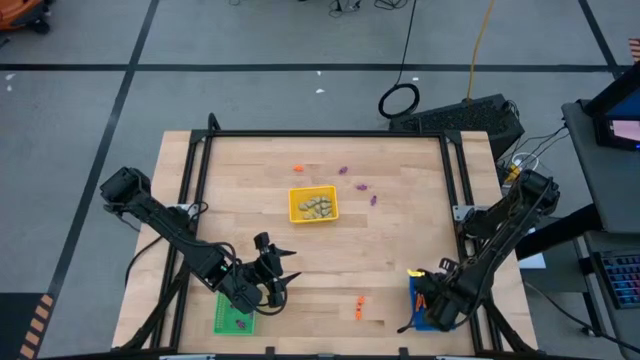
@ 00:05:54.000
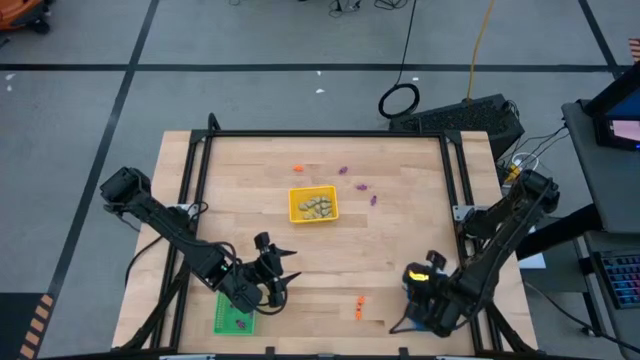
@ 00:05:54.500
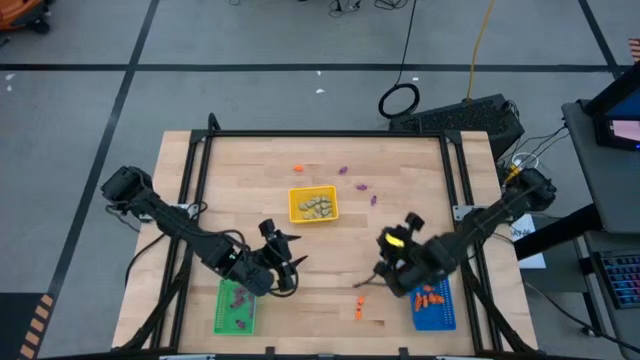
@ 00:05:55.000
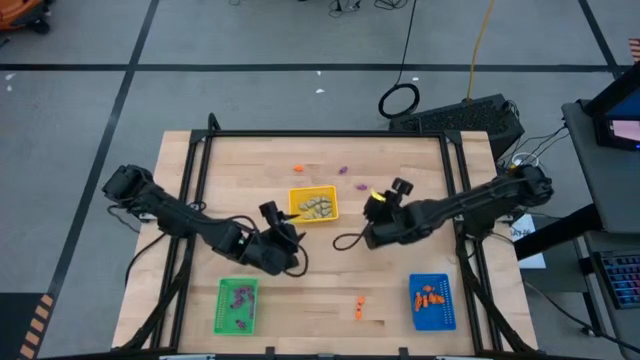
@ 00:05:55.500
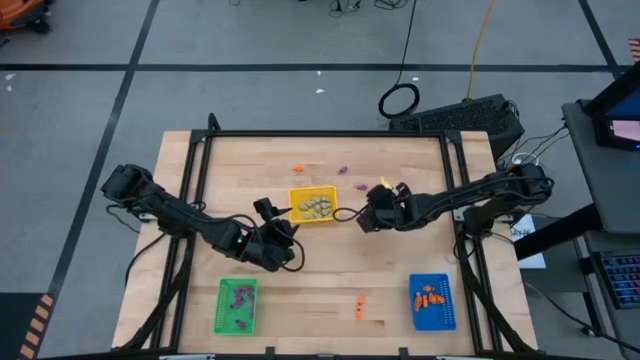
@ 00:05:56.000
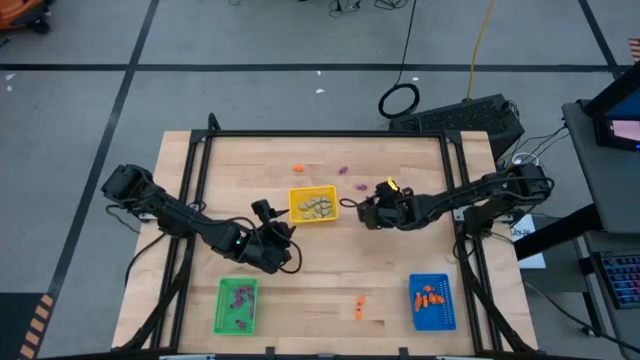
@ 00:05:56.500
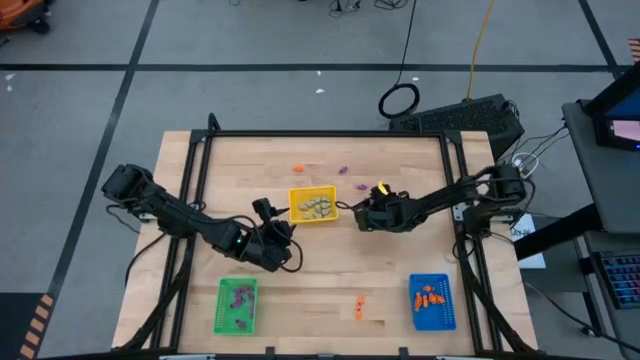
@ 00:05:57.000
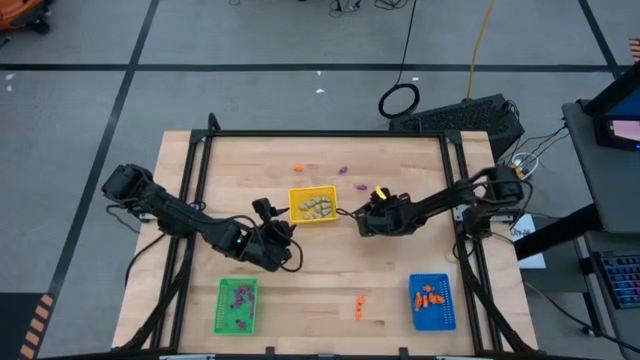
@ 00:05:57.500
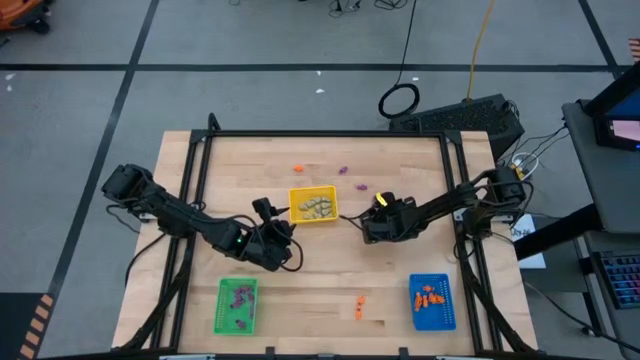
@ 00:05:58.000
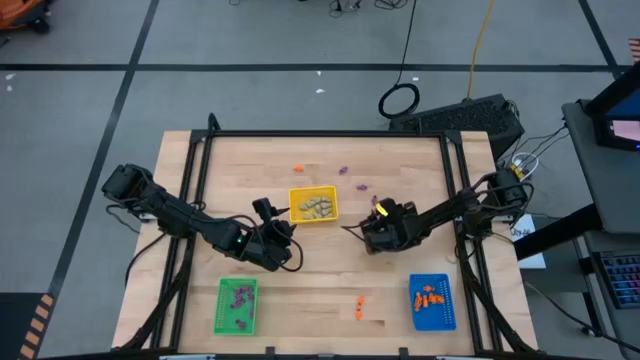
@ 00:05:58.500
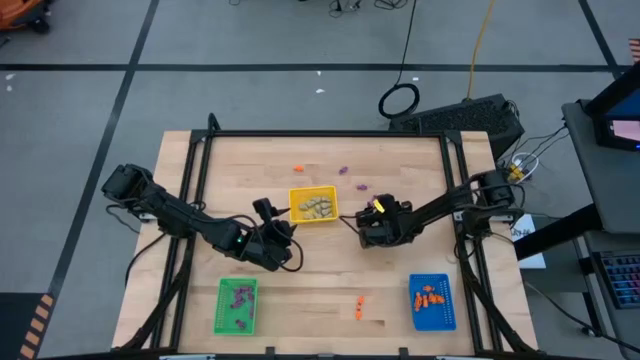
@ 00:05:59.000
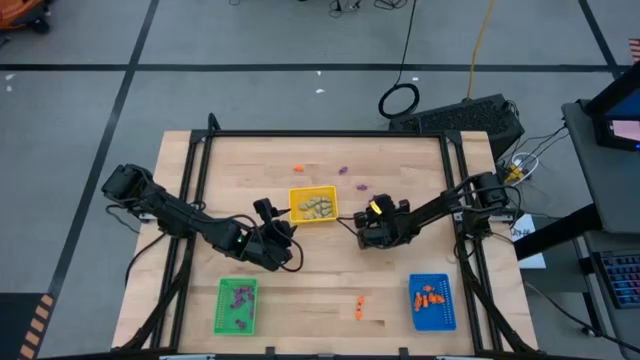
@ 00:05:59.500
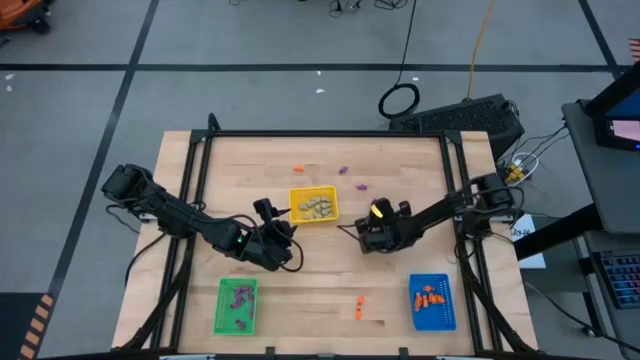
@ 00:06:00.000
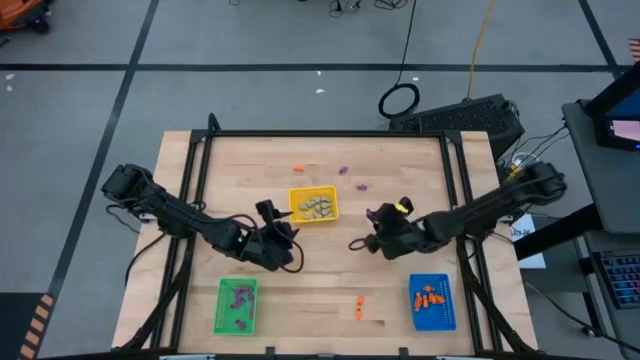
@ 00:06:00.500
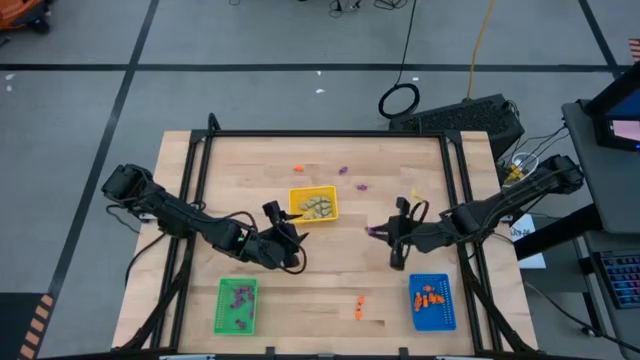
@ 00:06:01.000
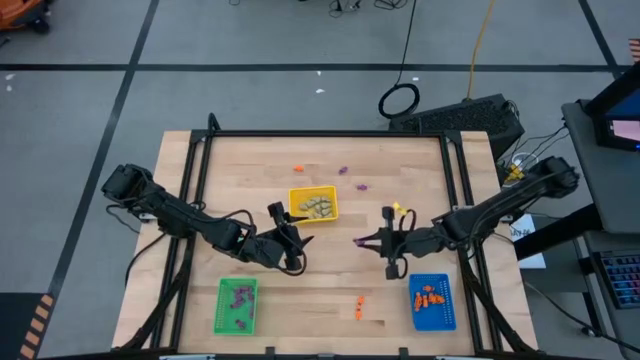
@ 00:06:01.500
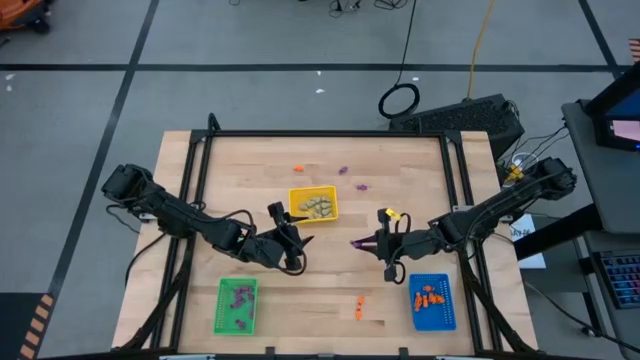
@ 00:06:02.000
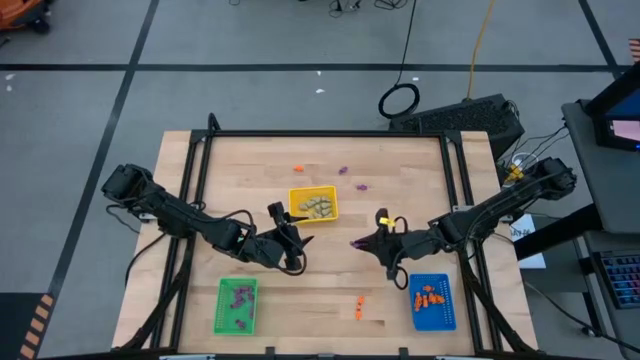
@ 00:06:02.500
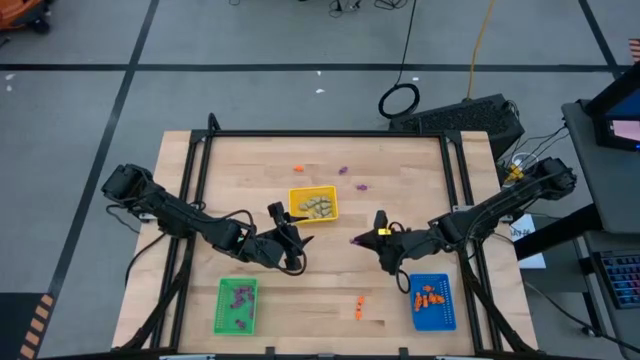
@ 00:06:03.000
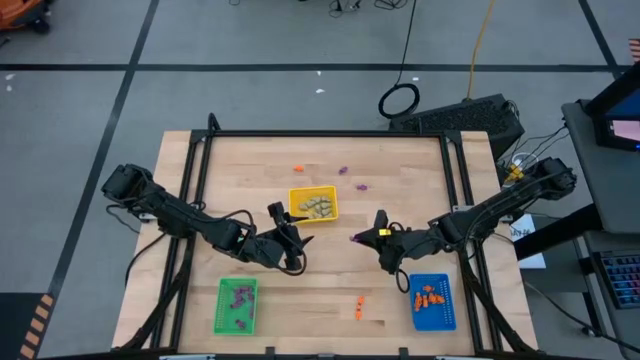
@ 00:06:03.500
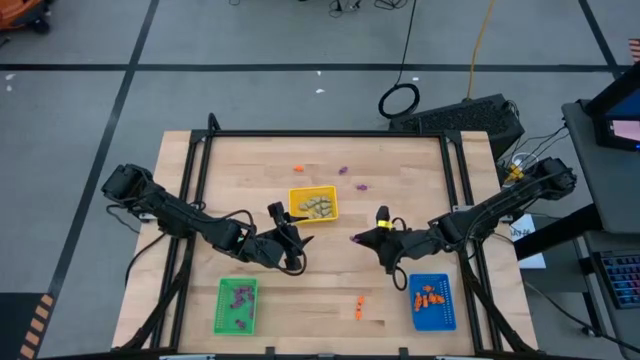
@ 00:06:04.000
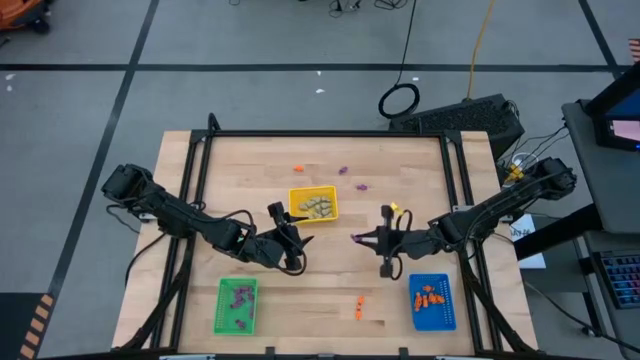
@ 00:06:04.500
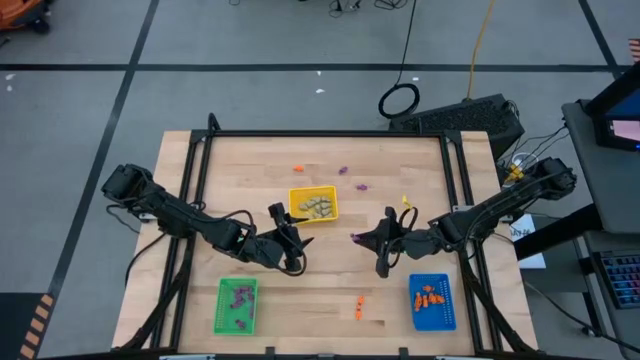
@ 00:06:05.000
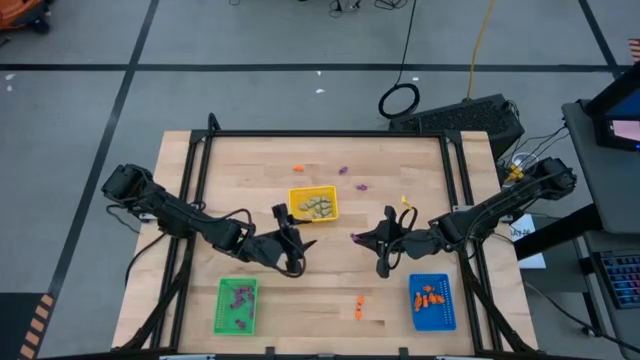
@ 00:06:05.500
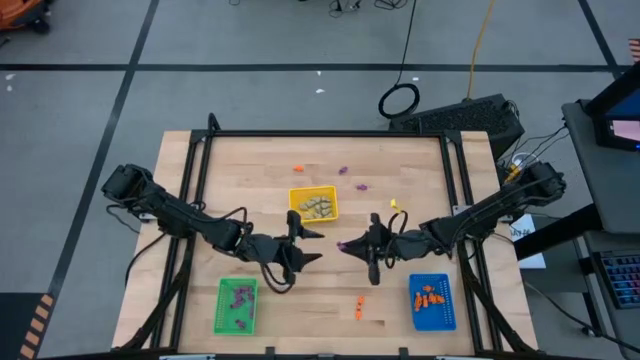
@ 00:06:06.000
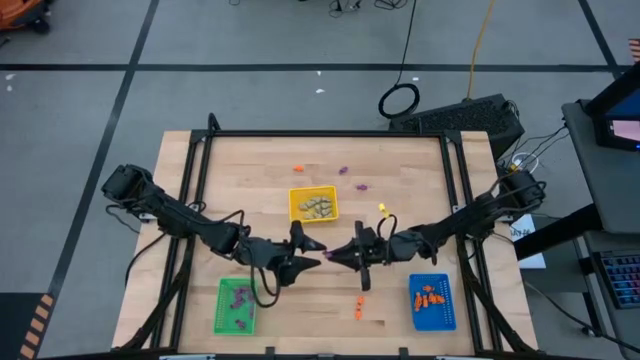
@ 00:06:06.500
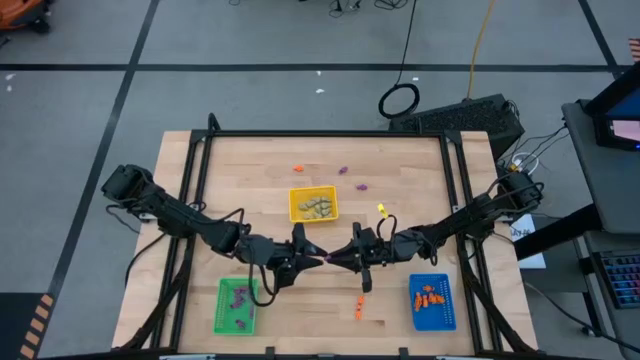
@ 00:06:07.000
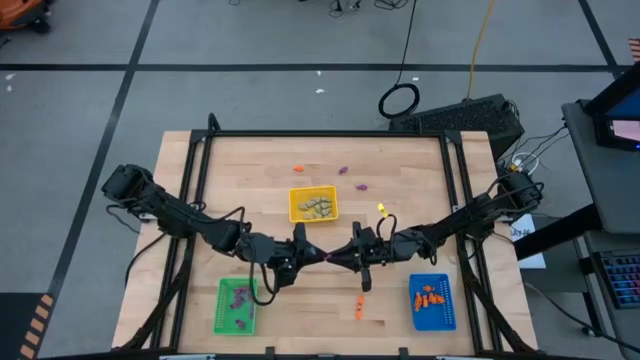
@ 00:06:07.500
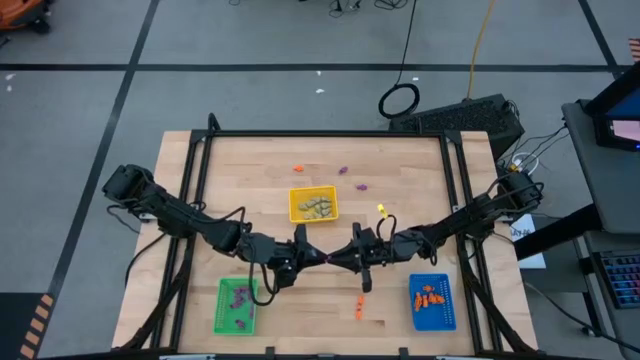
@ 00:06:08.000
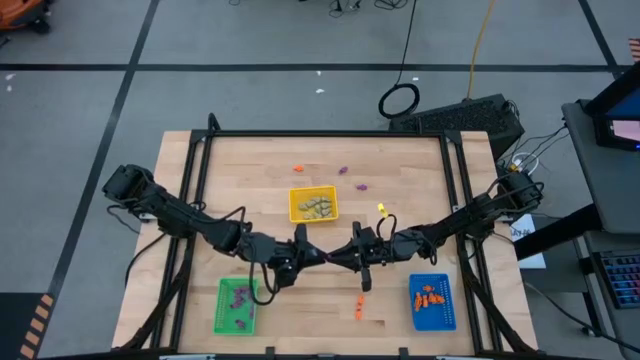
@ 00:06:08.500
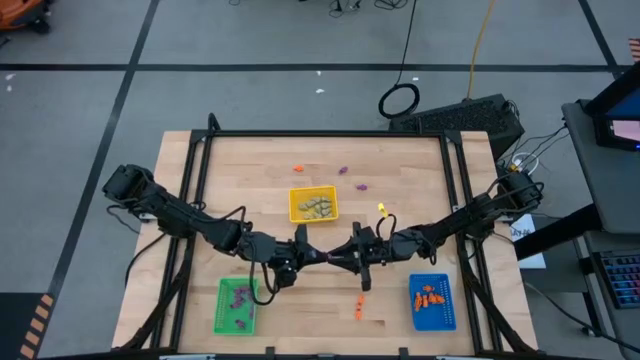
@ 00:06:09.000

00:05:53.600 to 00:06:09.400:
Task: Sort Halloween decoration
Put the purple skeleton toy in the green basket

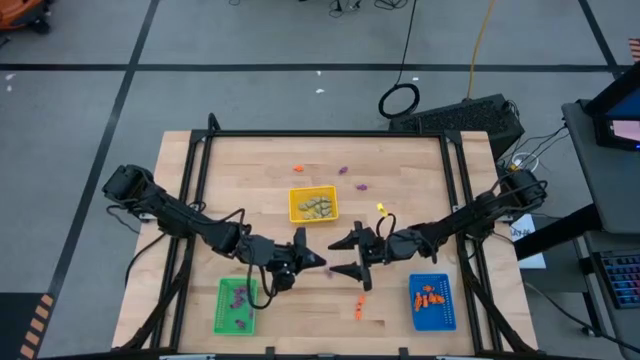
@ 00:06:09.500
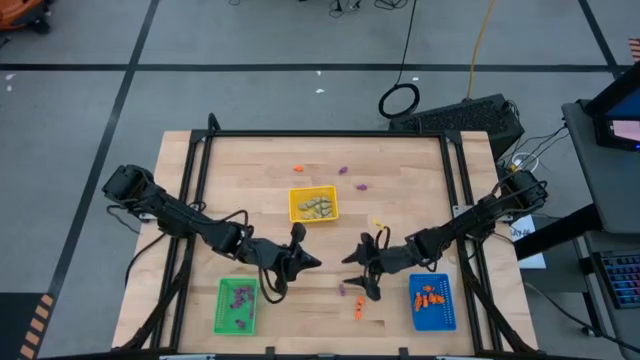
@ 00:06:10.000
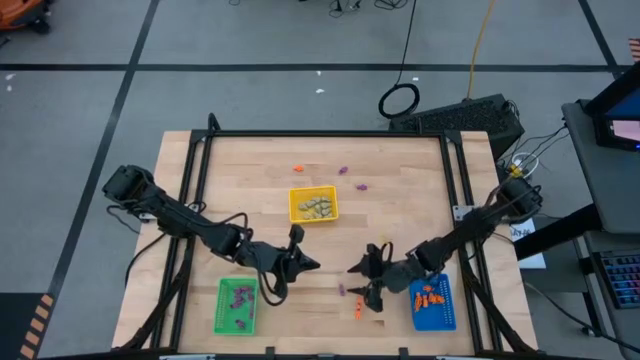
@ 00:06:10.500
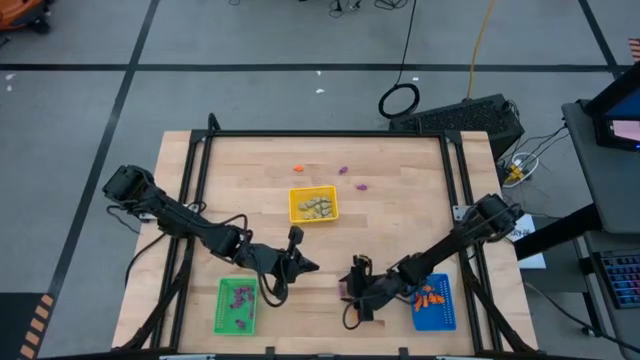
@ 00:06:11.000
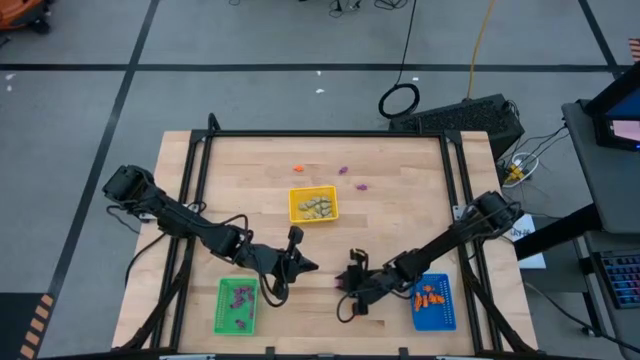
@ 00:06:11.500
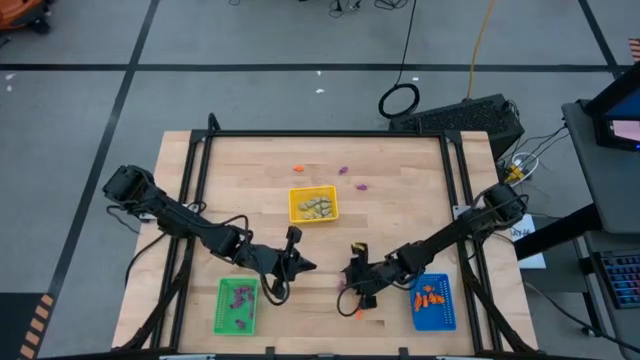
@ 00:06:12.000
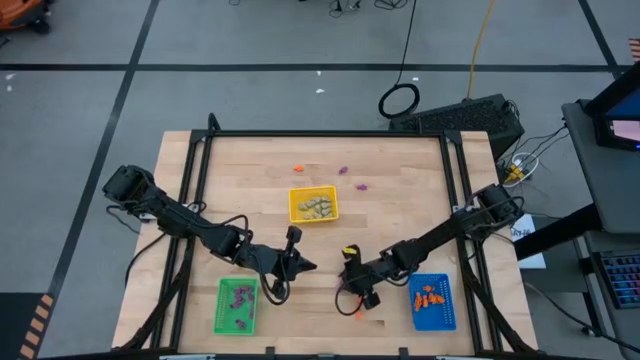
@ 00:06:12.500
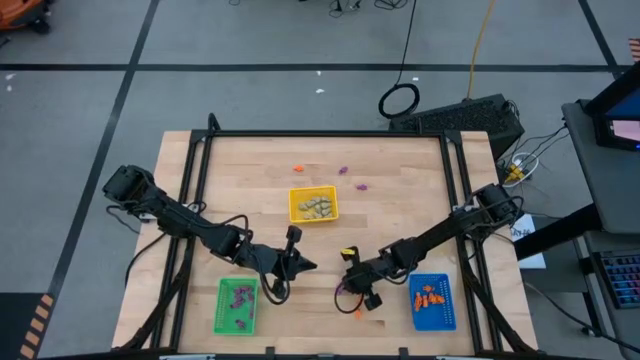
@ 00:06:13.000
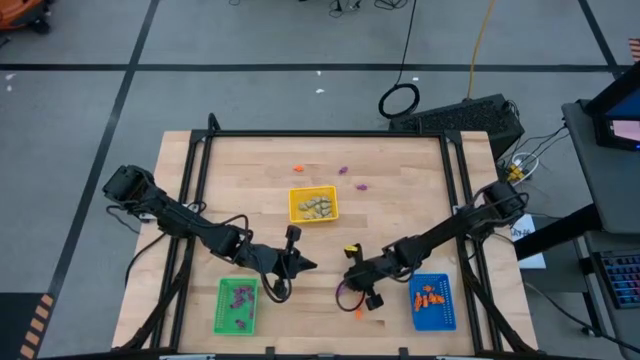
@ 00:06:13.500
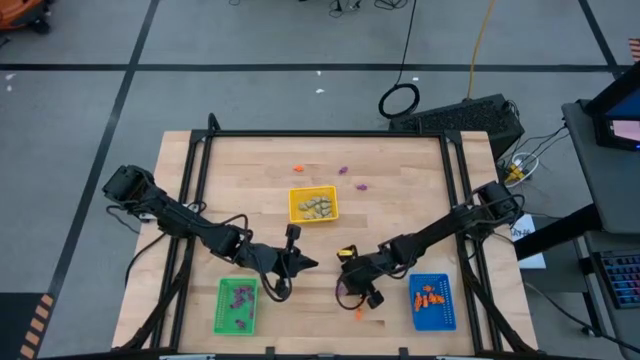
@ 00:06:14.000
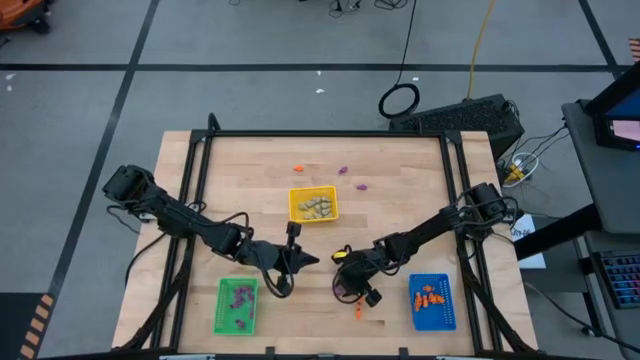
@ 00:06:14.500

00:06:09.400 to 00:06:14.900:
Put the purple skeleton toy in the green basket
